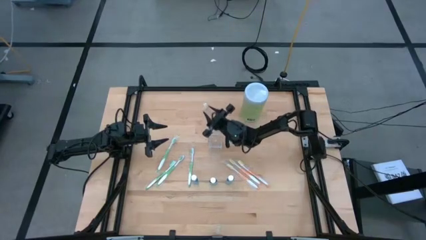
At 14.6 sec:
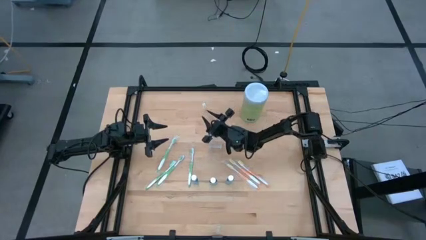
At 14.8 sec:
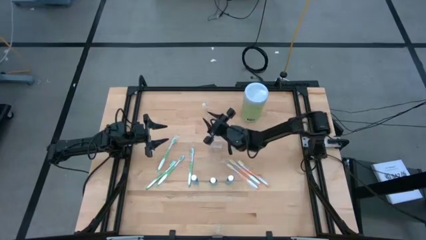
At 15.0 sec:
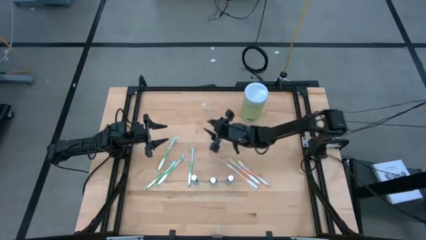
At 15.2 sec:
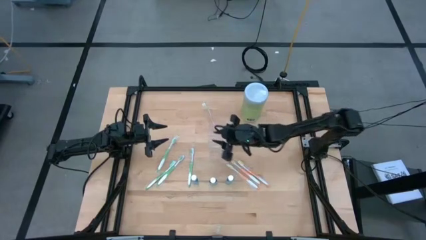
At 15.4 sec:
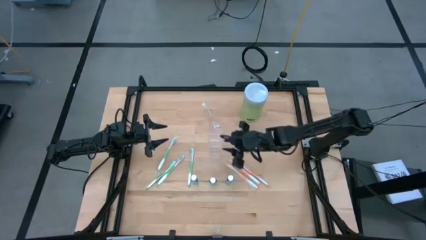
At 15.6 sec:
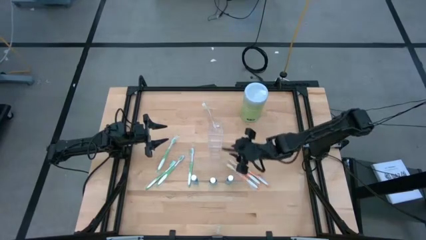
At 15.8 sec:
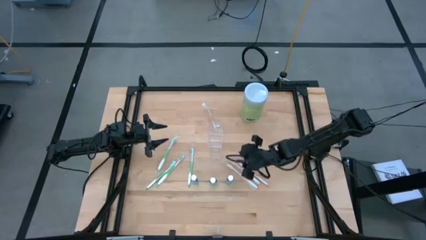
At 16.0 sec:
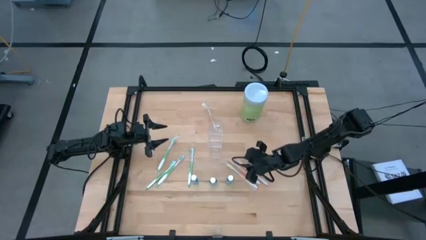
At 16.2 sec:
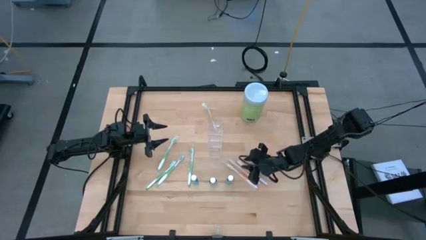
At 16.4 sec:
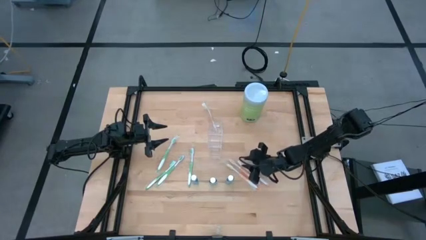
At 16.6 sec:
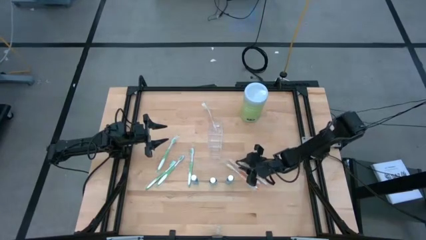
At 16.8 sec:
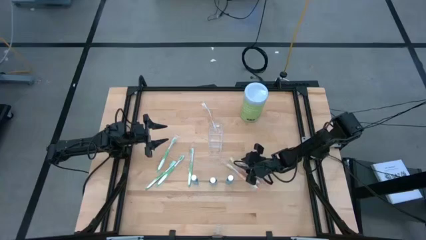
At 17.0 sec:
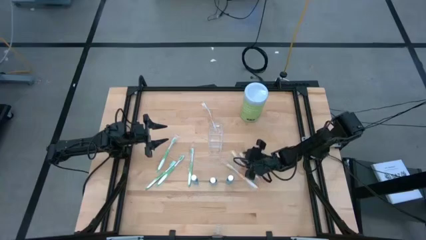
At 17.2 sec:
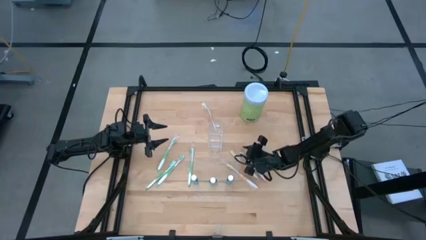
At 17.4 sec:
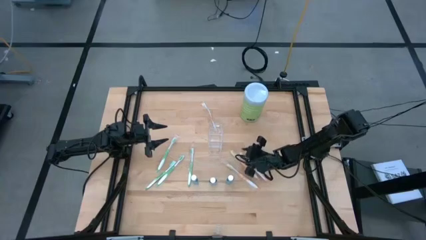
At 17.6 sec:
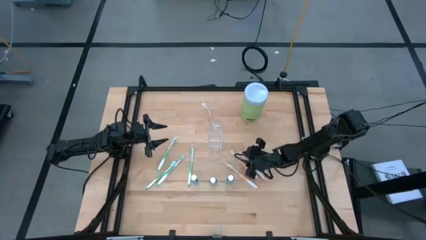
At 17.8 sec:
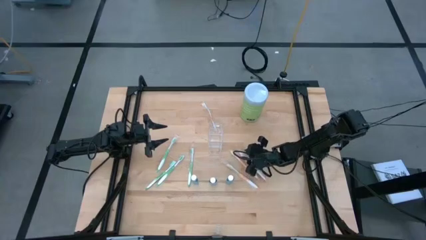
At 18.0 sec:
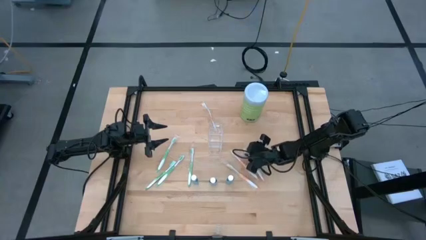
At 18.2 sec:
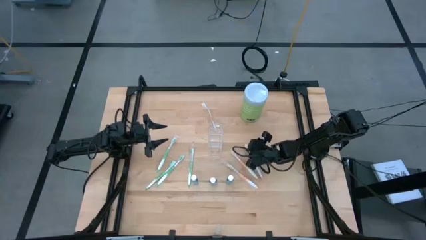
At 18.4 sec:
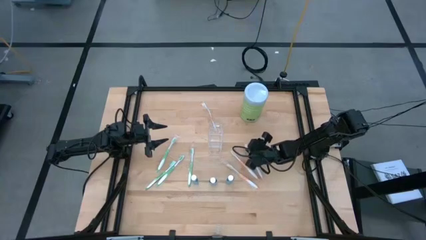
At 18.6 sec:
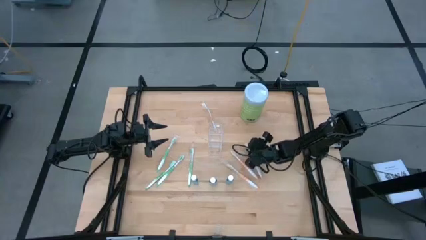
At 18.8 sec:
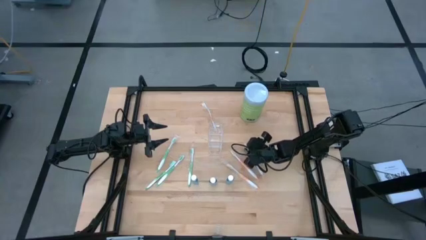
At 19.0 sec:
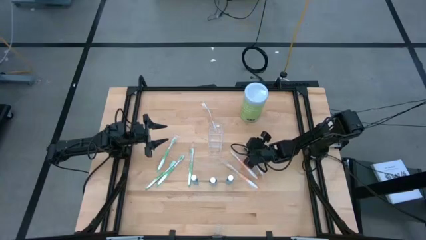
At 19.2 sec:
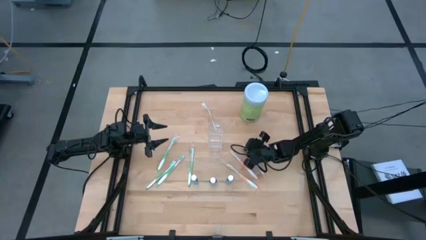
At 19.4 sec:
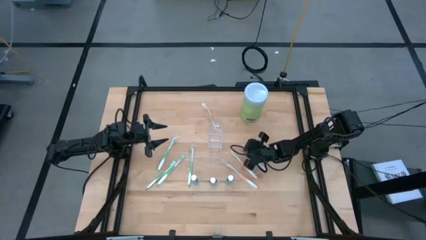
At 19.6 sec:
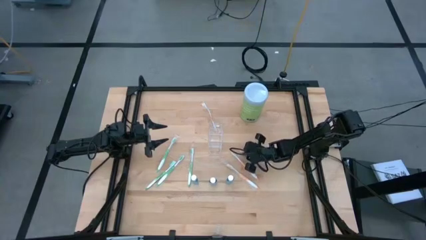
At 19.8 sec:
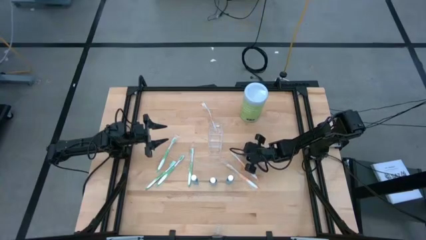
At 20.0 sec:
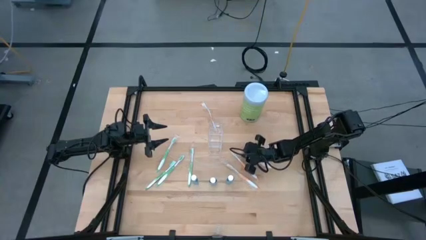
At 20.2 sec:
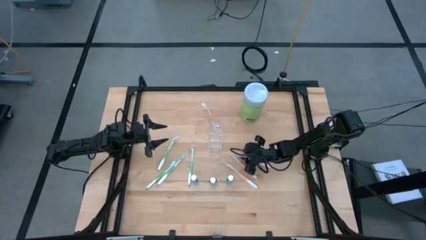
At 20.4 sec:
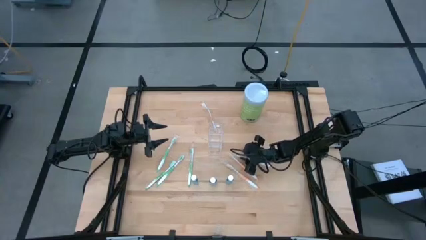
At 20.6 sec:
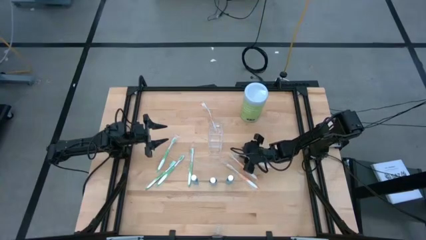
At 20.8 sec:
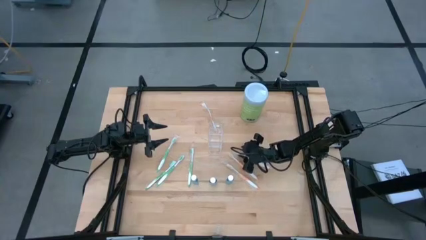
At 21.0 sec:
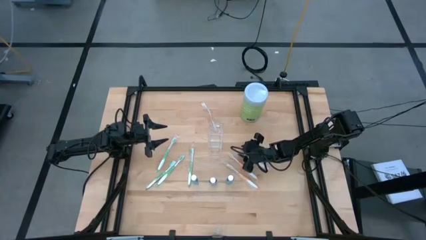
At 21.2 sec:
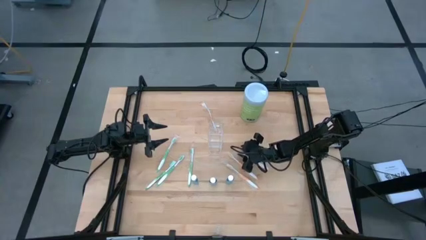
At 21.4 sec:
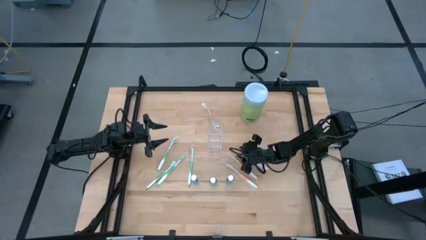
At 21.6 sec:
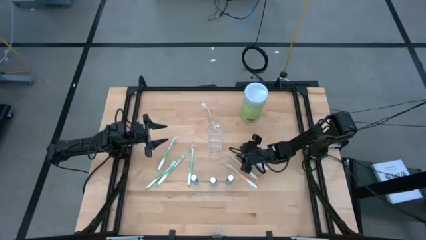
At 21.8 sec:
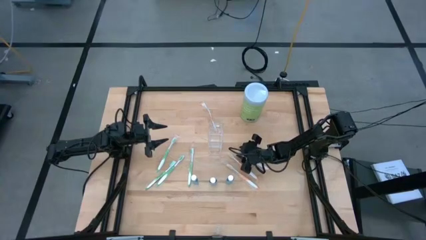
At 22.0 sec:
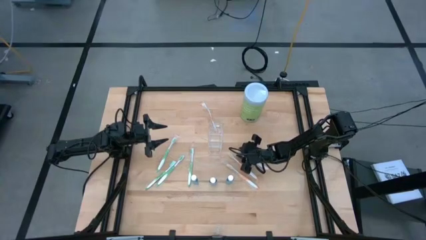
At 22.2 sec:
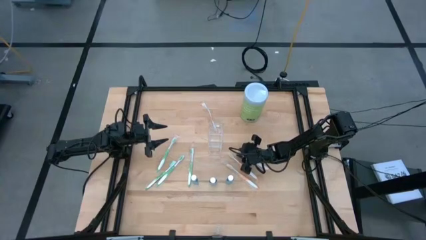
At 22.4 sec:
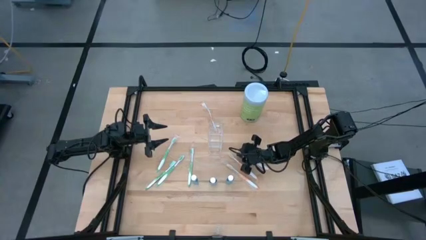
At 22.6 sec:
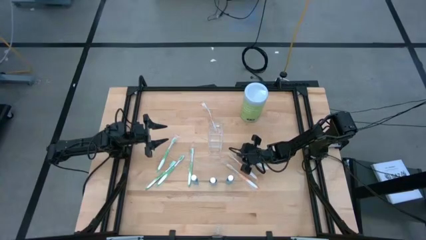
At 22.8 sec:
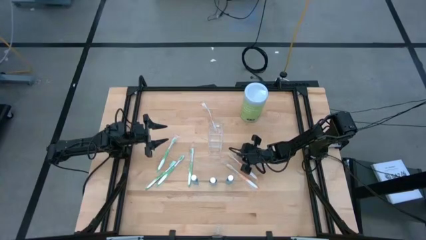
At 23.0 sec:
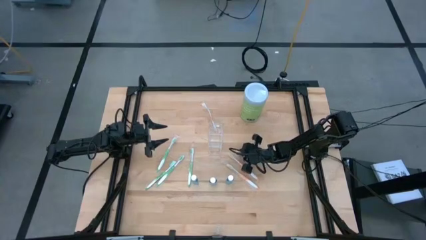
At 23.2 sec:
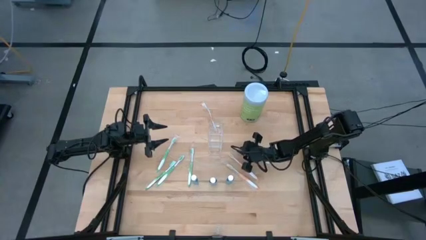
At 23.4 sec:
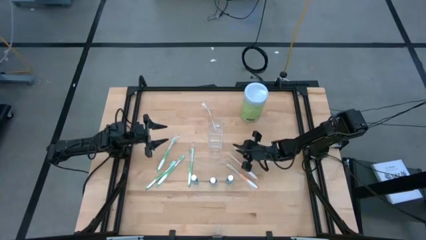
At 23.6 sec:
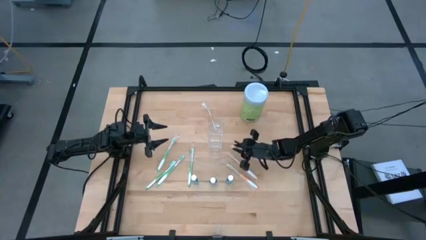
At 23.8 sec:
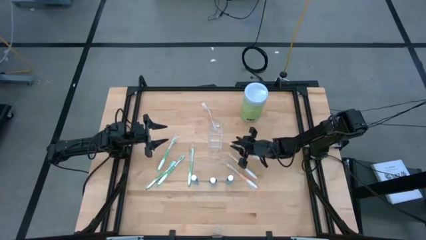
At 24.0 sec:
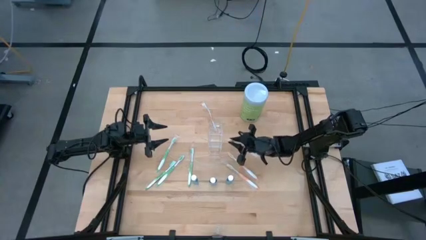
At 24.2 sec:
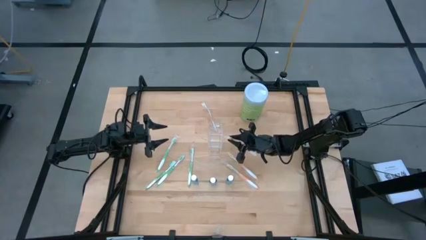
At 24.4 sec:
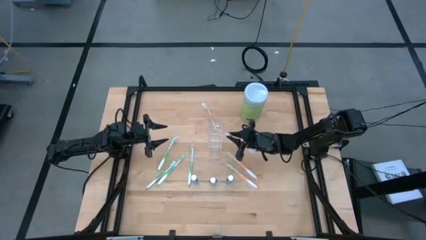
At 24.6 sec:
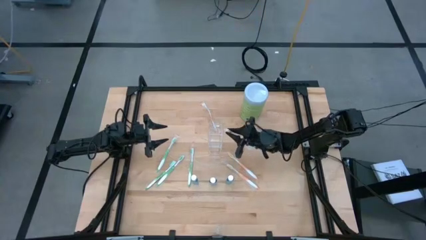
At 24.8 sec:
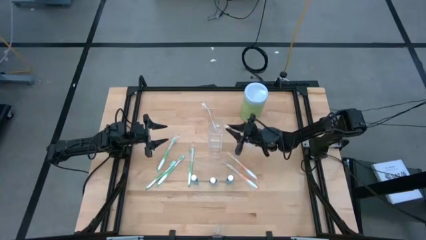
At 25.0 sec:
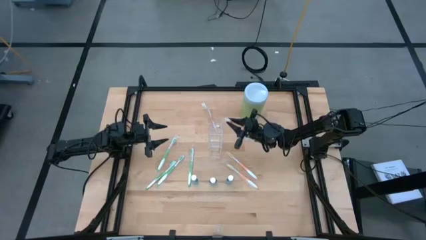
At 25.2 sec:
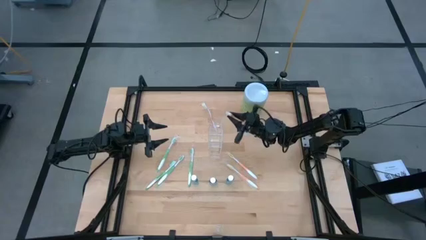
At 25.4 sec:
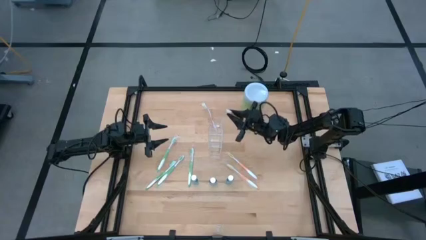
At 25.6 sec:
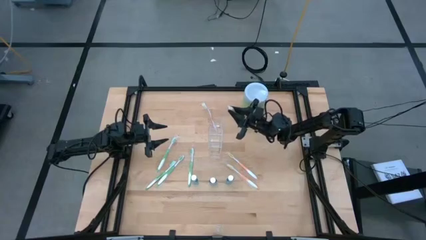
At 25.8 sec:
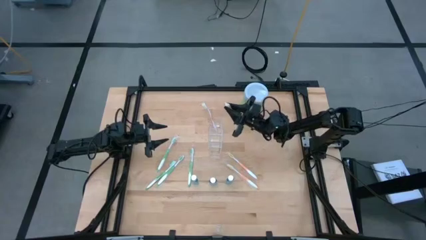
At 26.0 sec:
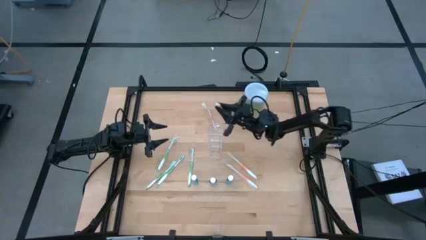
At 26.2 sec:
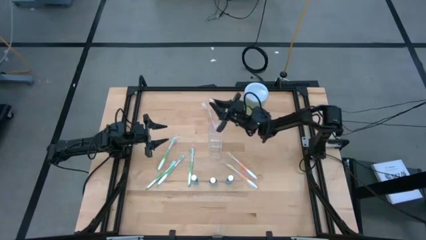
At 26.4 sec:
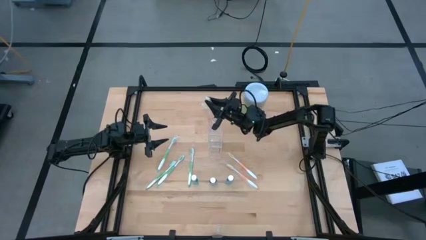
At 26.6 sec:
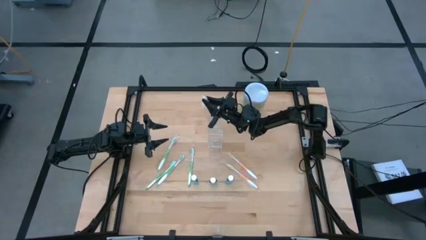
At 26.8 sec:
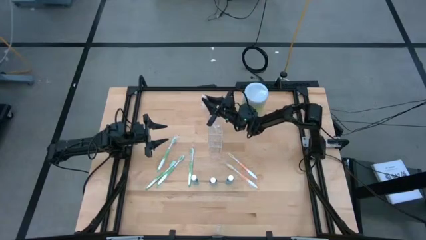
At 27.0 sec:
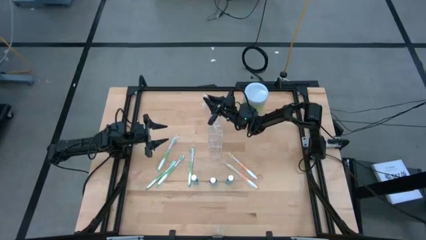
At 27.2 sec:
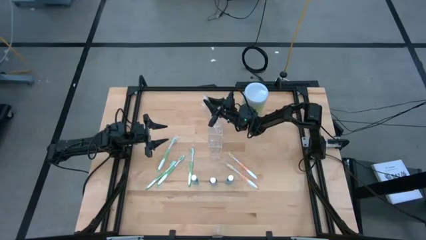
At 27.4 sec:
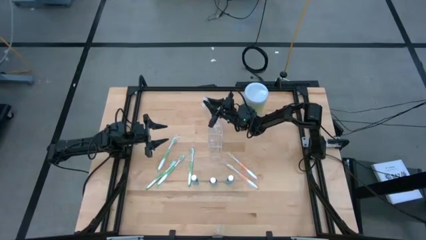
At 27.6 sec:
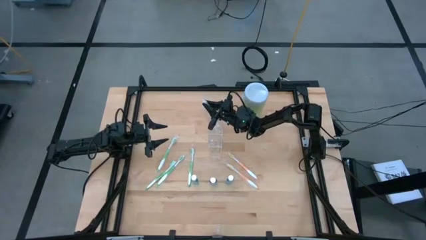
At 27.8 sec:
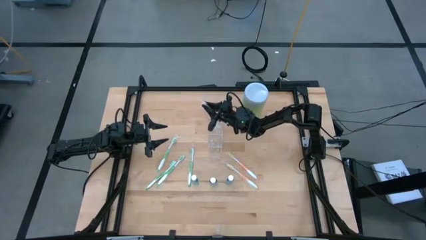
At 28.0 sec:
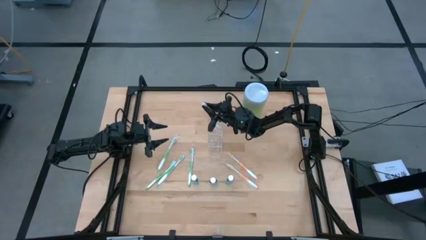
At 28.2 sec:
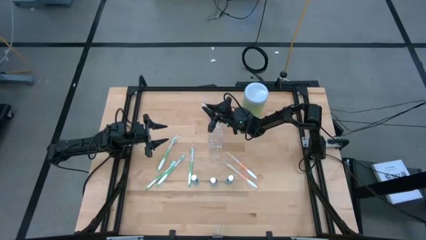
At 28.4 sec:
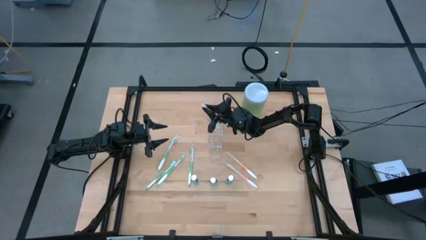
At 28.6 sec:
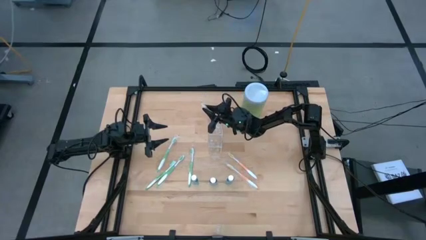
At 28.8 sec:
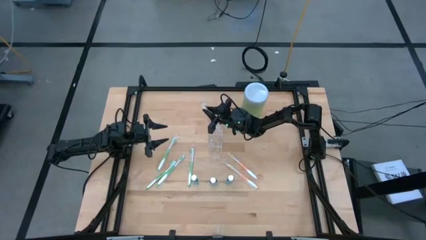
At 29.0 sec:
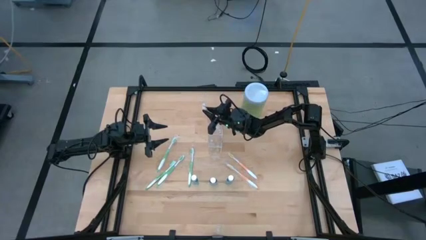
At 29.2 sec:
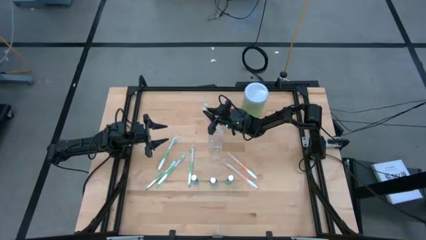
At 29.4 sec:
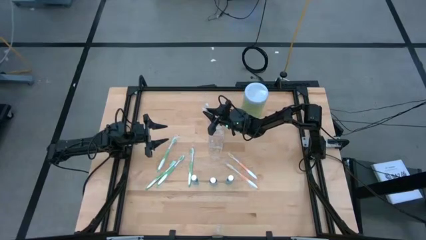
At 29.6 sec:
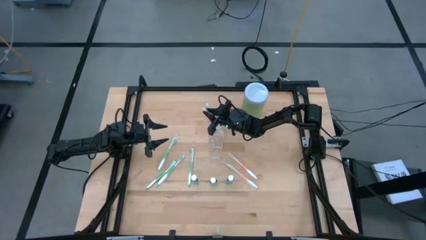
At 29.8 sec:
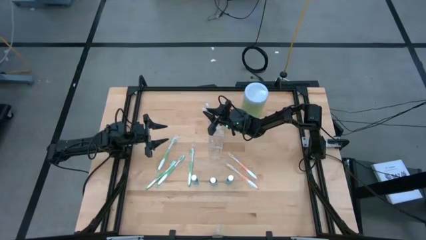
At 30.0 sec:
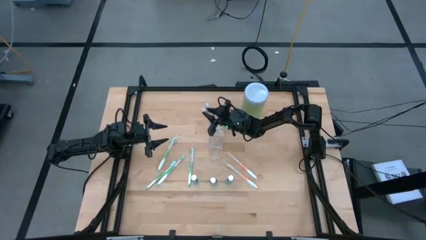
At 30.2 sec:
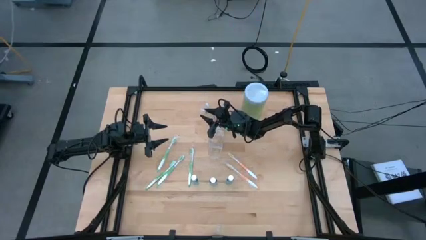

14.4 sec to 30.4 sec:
Task: Pick & Place toothbrushing station
Put the orange toothbrush with the other orange toothbrush in the transparent organizer

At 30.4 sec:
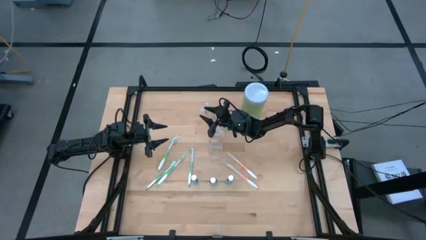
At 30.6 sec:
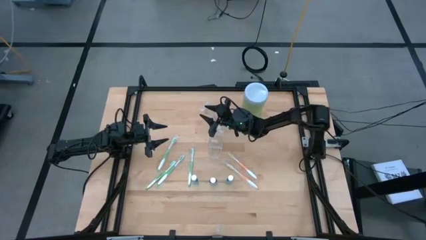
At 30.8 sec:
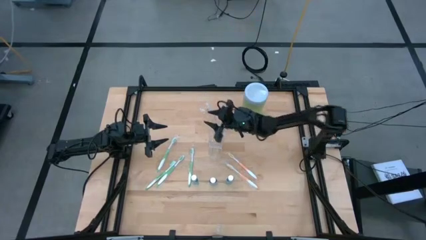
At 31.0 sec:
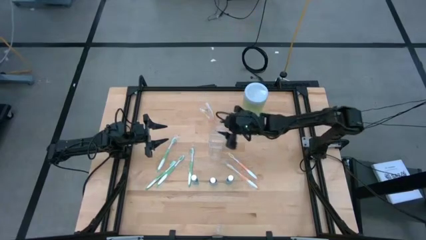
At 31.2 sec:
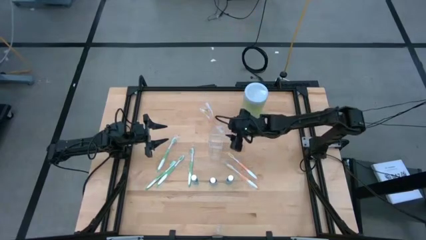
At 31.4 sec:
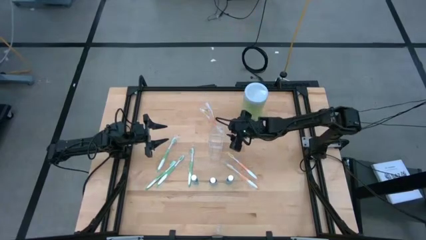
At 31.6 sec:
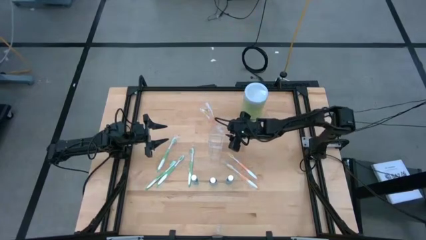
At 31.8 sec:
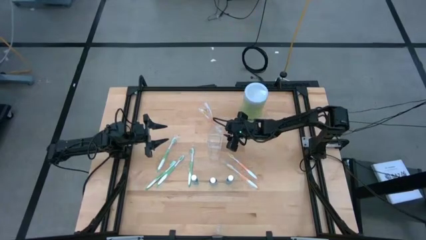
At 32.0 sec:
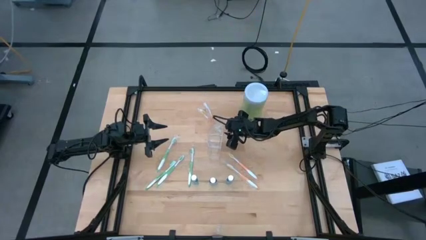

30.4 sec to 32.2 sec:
Adjust the transparent organizer
